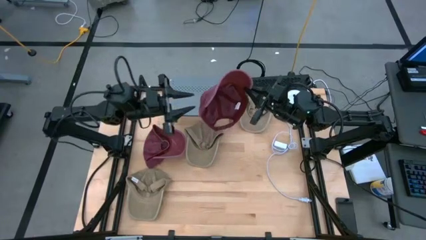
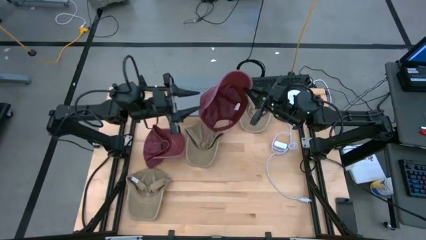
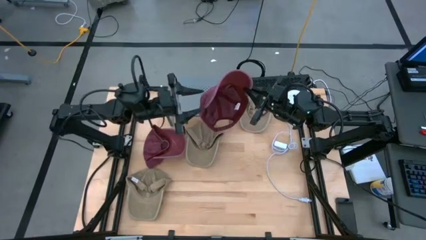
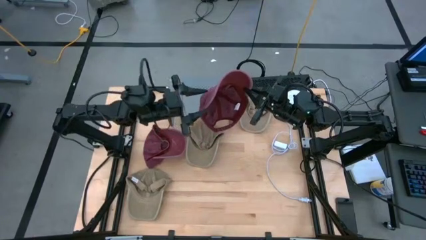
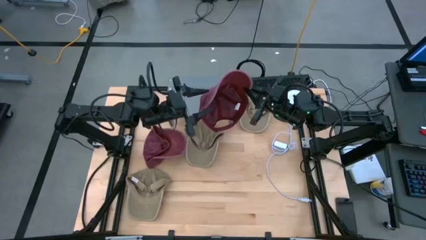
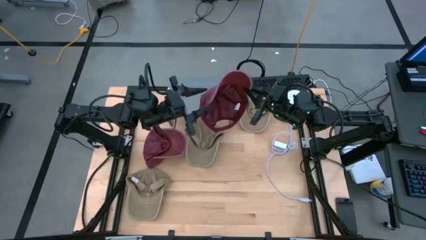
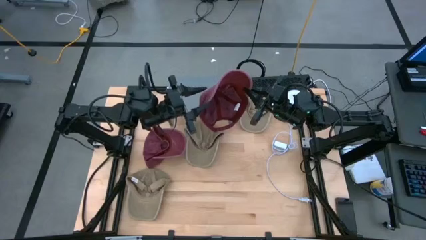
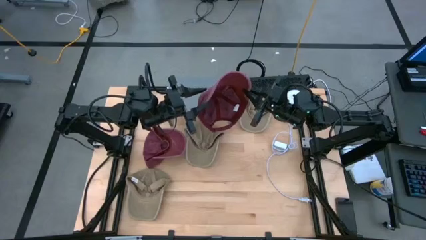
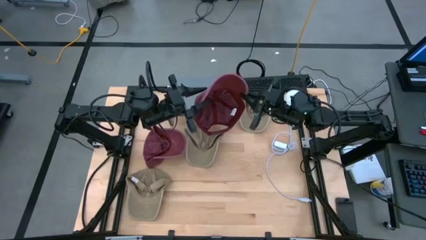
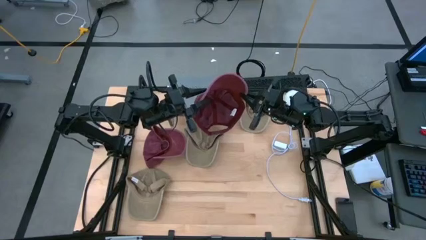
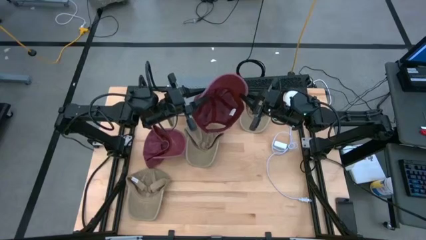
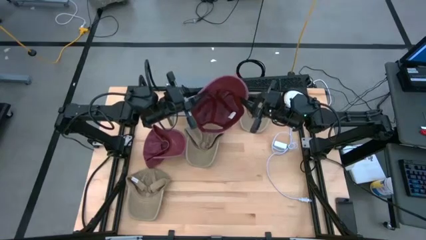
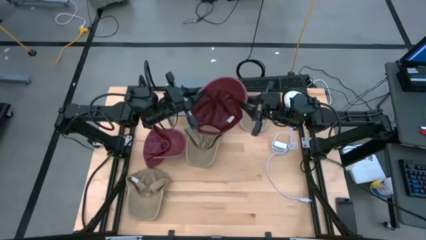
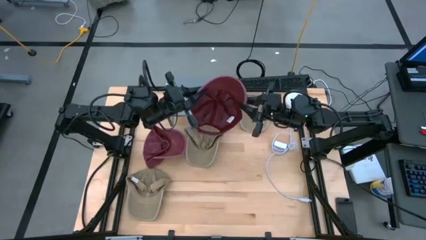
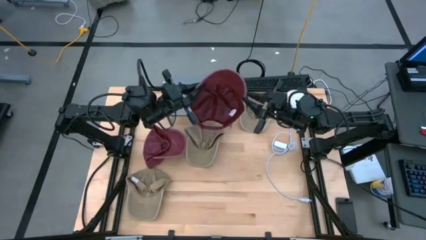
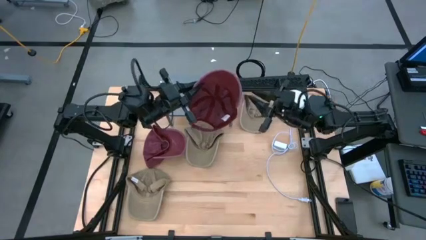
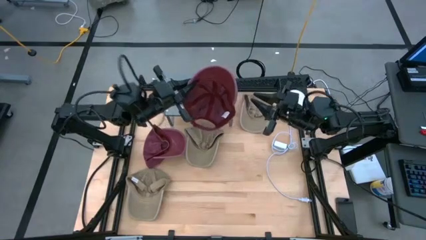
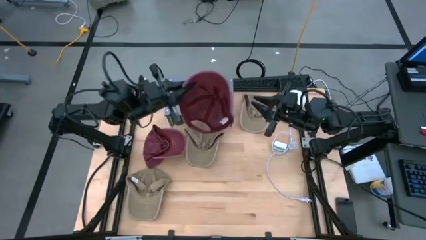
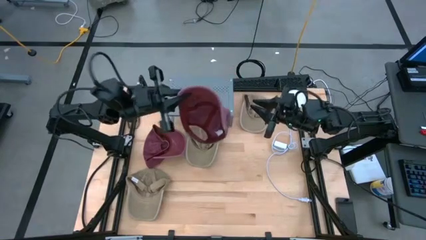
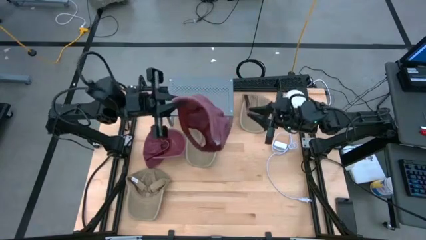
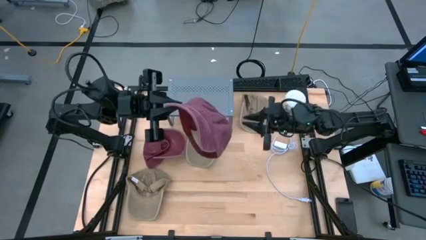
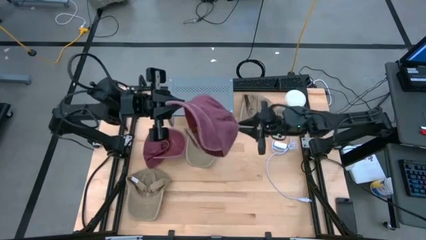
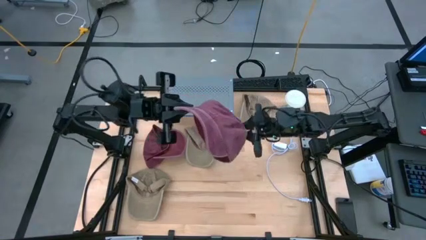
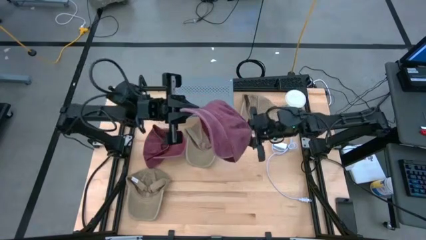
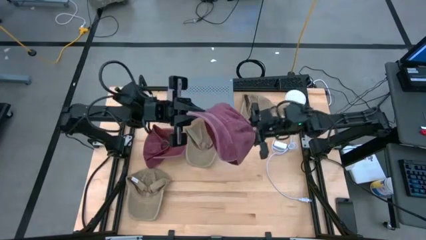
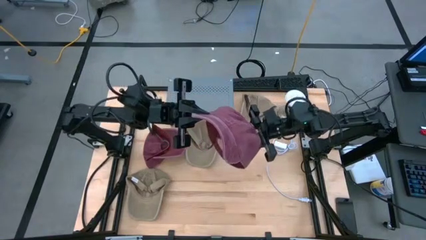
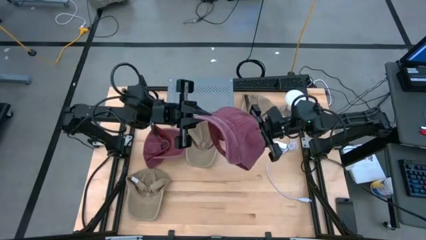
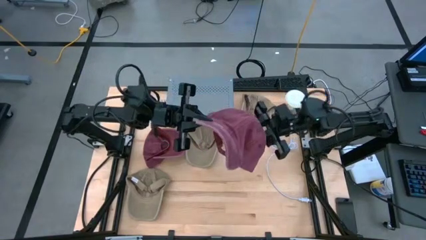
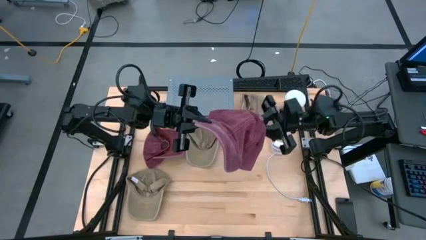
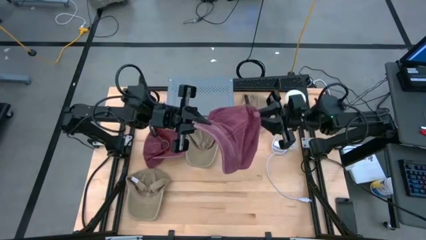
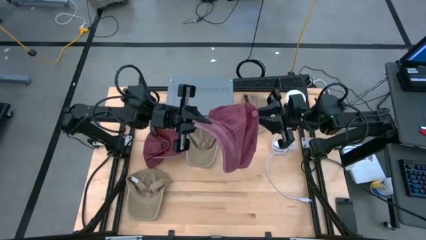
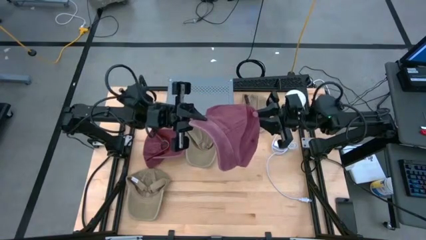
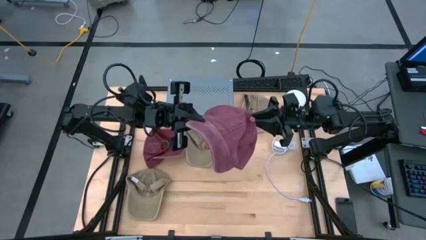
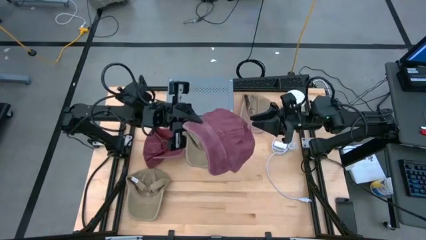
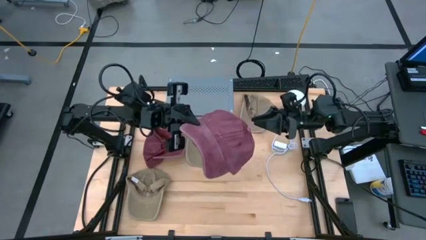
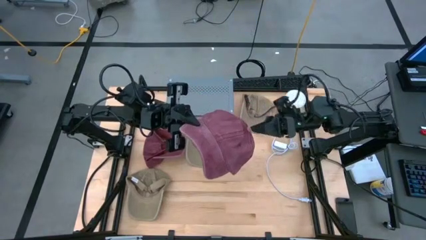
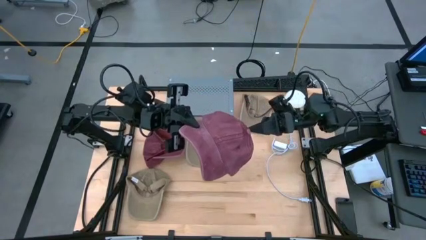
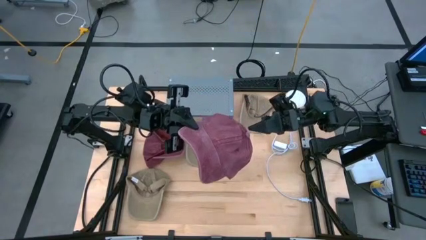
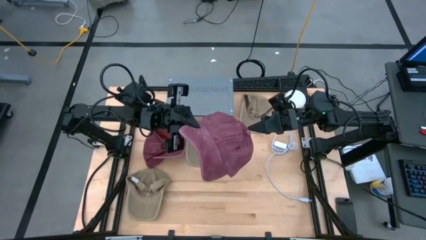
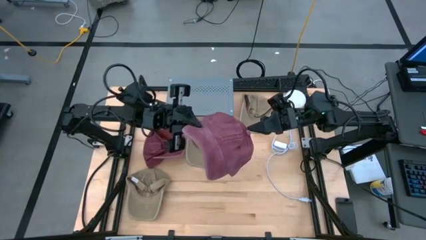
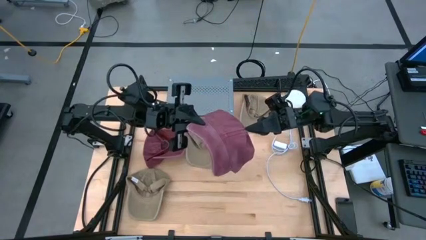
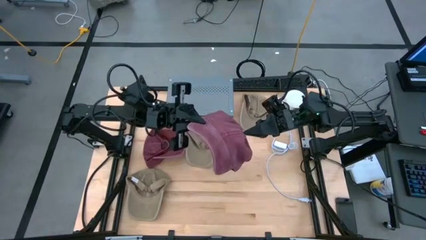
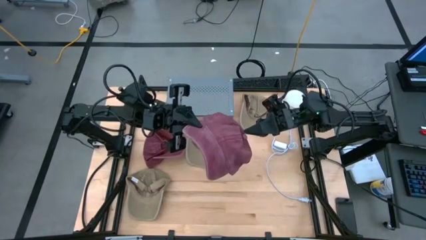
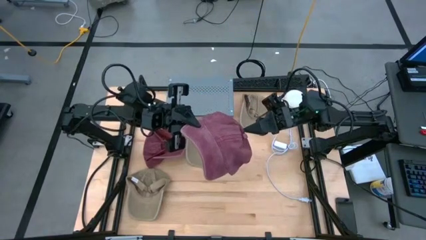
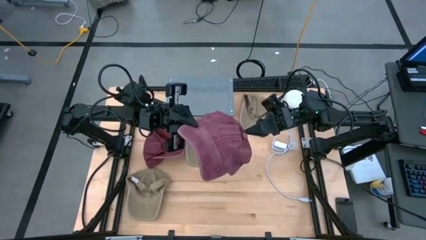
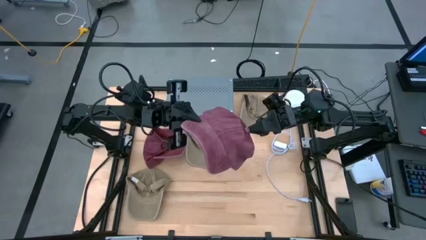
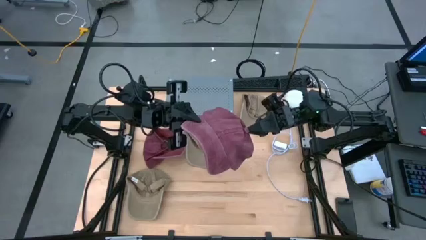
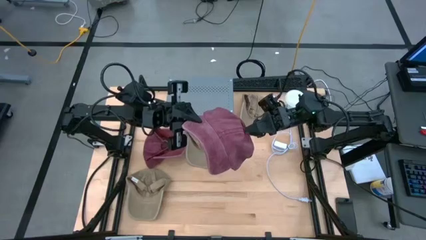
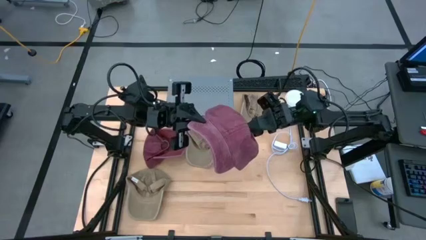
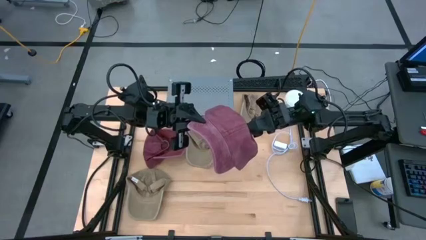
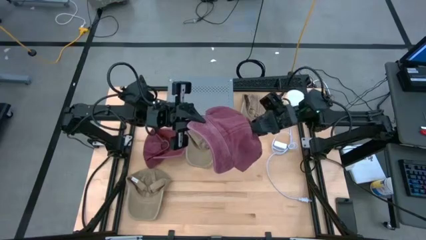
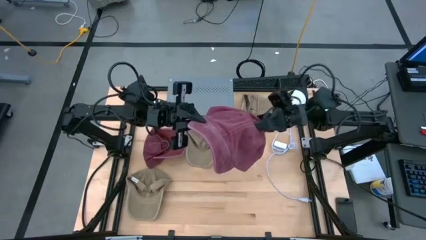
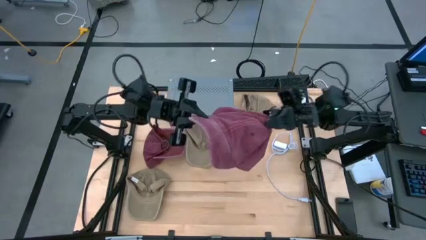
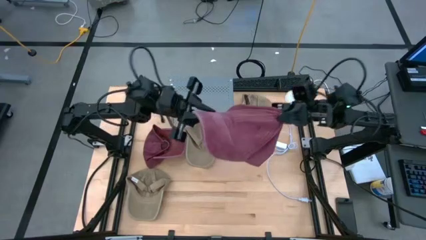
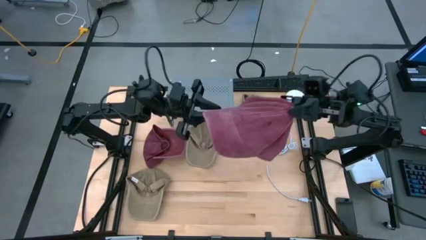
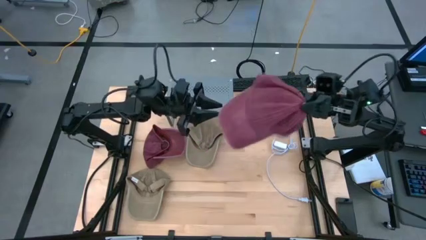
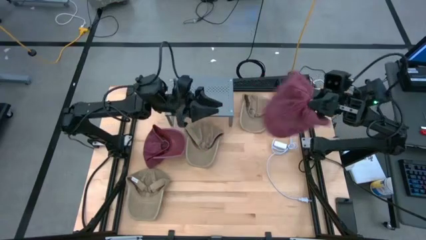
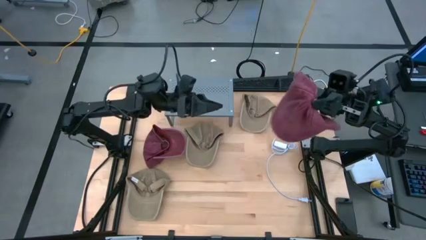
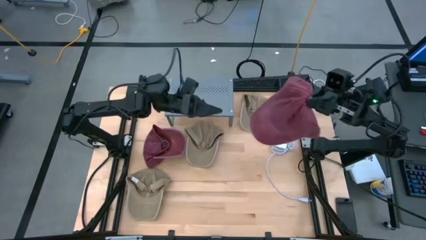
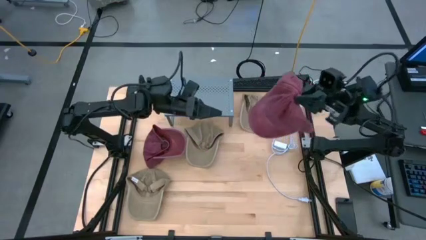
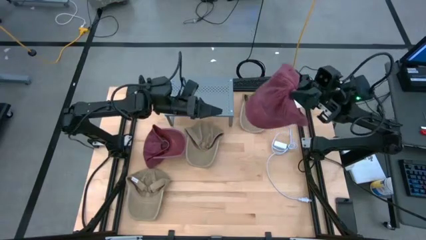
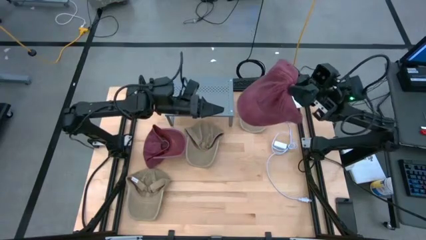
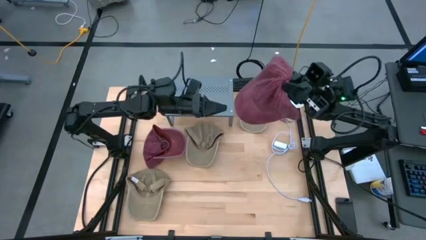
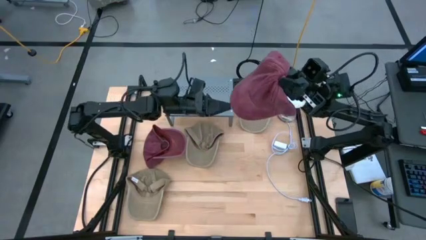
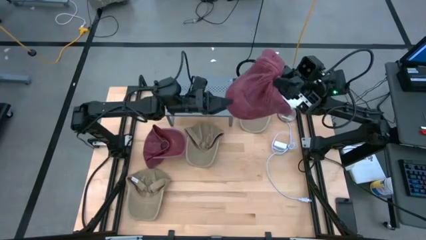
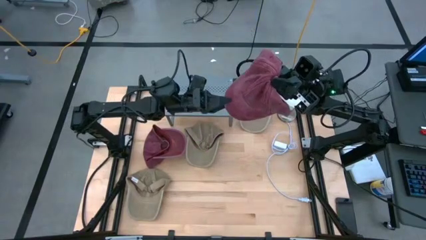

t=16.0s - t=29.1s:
Task: Pick & Place hat
Put the dark red cap on the shelf
